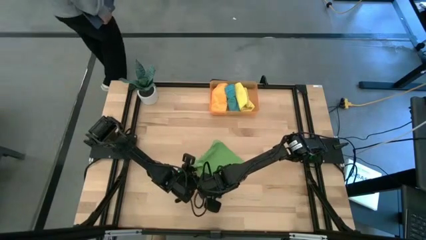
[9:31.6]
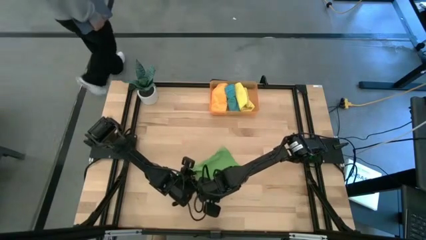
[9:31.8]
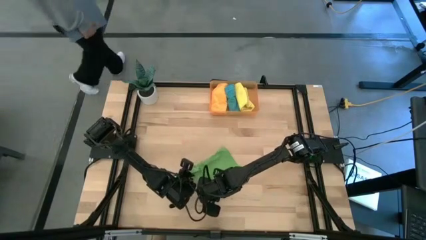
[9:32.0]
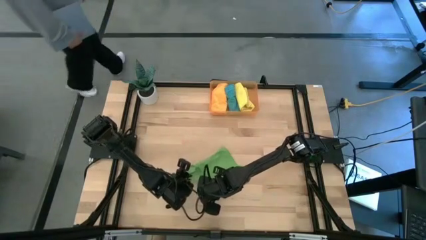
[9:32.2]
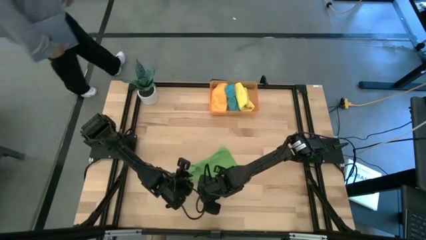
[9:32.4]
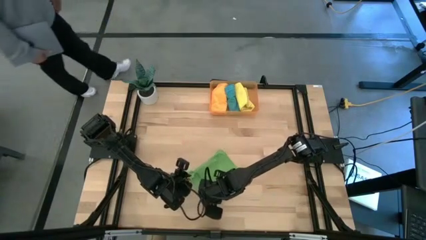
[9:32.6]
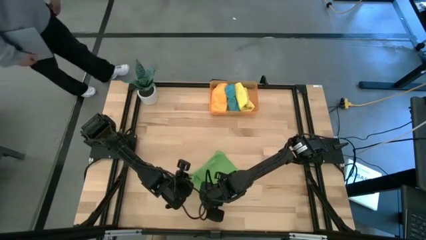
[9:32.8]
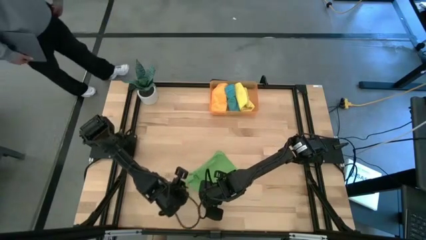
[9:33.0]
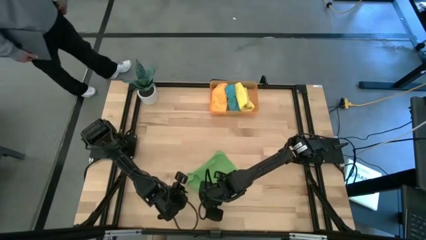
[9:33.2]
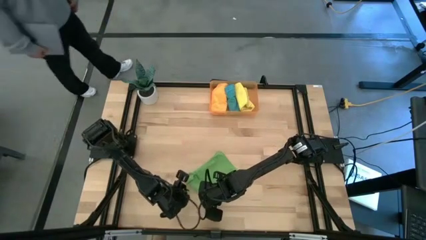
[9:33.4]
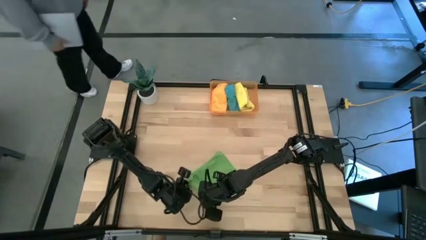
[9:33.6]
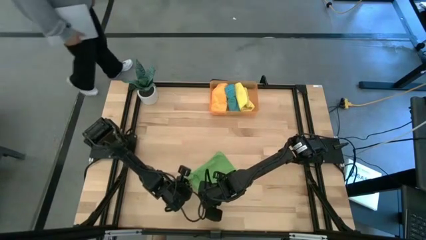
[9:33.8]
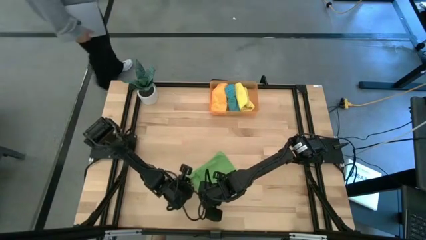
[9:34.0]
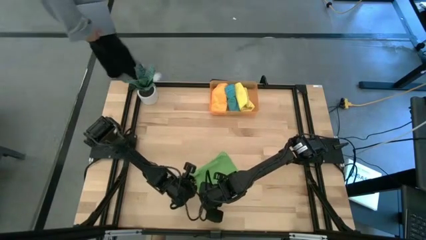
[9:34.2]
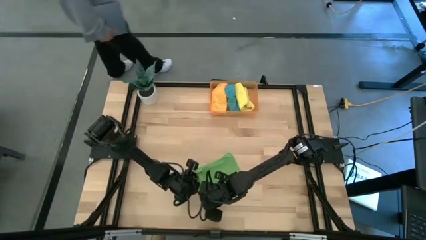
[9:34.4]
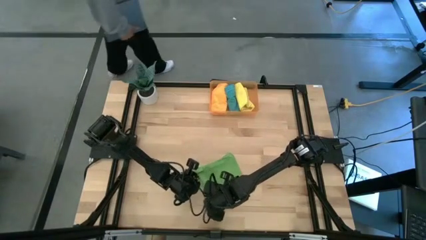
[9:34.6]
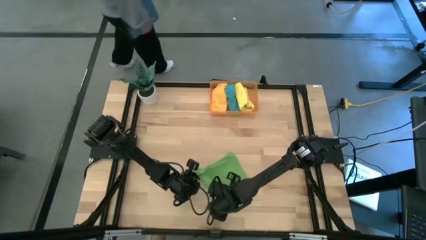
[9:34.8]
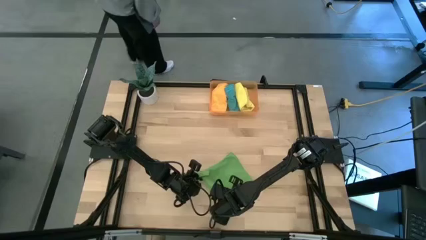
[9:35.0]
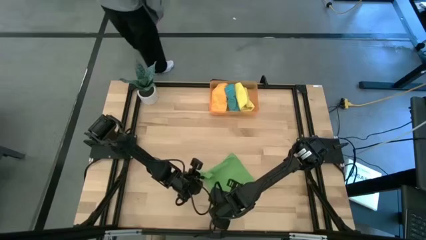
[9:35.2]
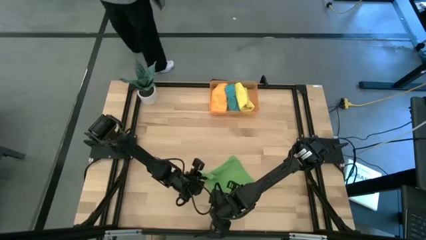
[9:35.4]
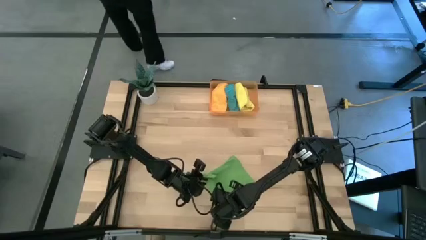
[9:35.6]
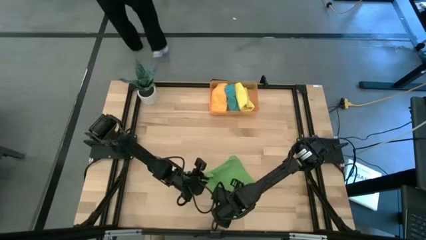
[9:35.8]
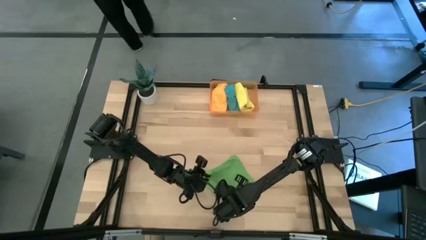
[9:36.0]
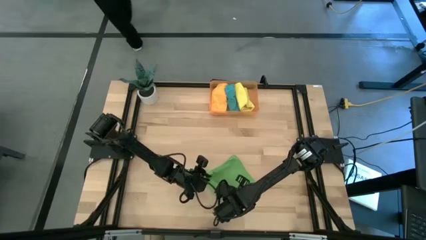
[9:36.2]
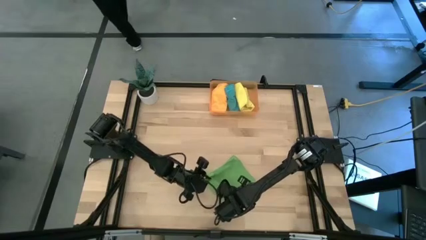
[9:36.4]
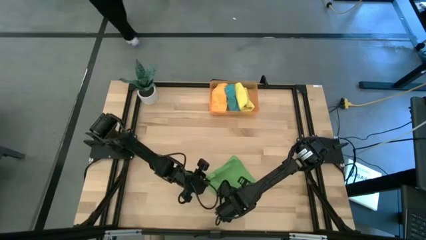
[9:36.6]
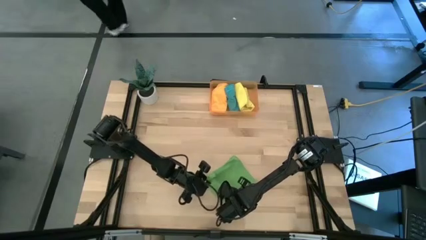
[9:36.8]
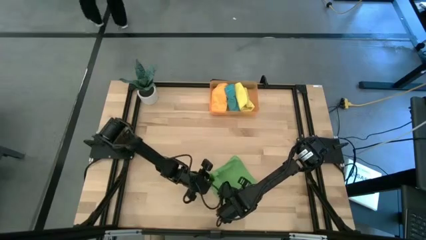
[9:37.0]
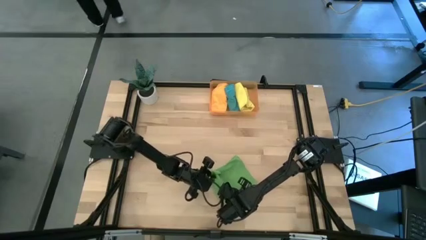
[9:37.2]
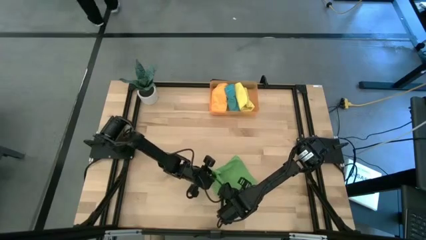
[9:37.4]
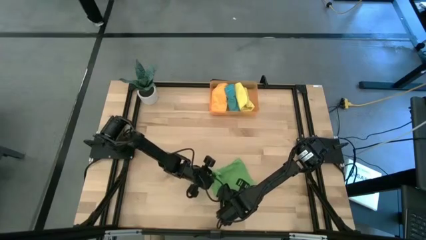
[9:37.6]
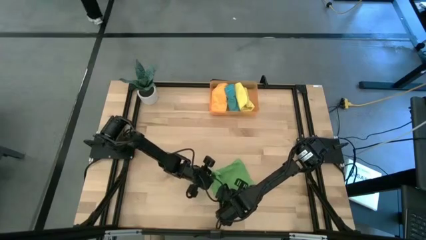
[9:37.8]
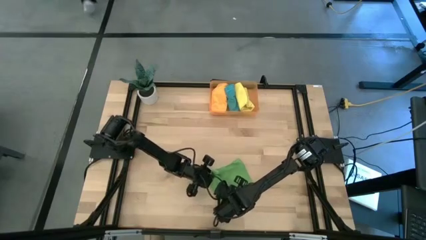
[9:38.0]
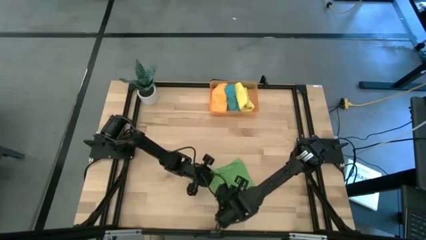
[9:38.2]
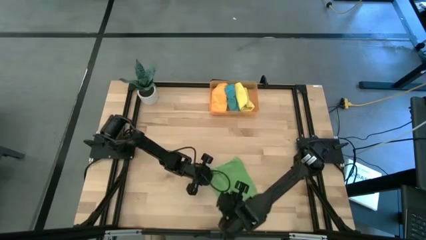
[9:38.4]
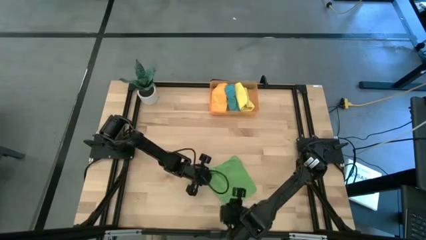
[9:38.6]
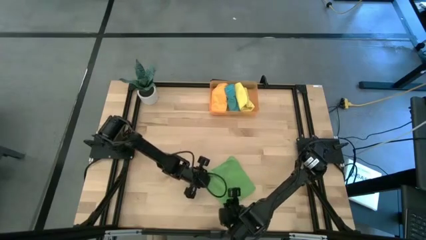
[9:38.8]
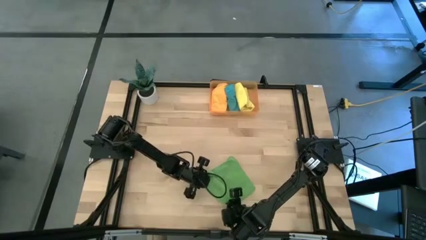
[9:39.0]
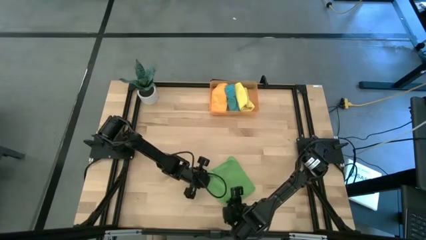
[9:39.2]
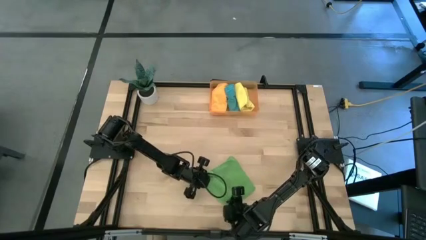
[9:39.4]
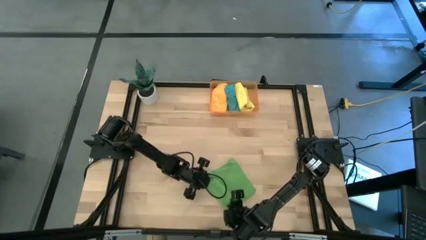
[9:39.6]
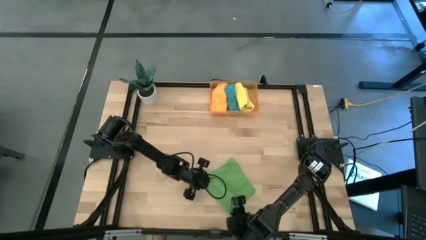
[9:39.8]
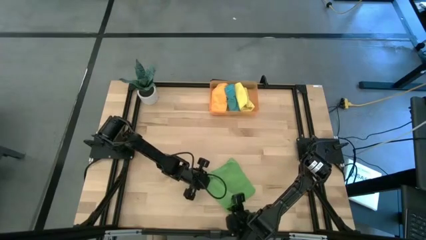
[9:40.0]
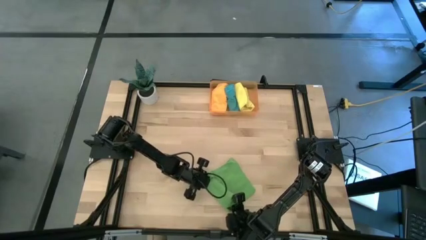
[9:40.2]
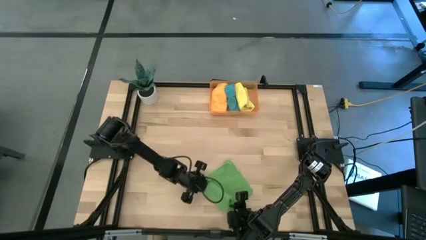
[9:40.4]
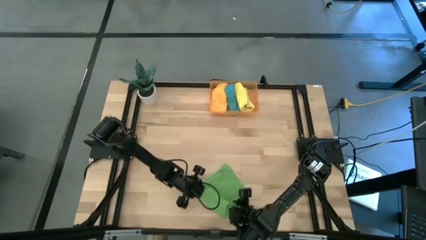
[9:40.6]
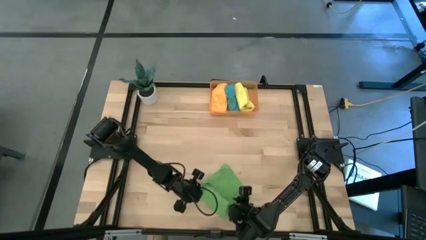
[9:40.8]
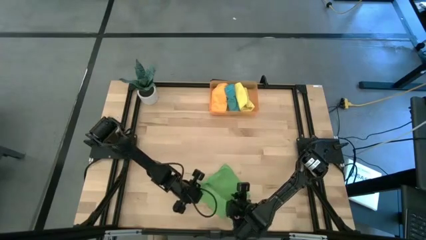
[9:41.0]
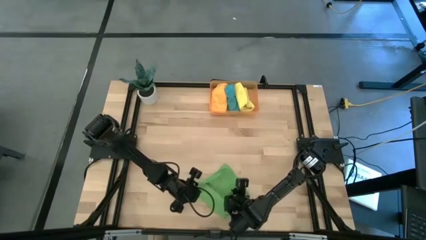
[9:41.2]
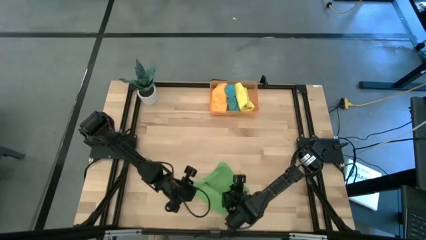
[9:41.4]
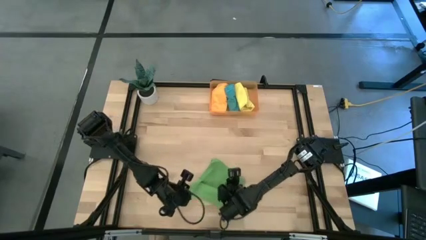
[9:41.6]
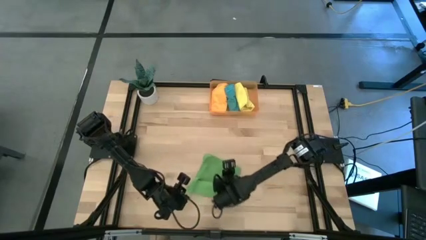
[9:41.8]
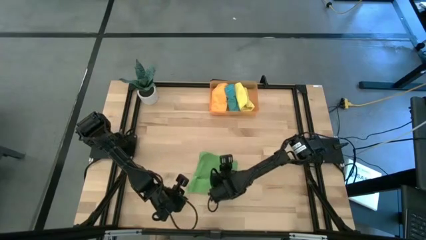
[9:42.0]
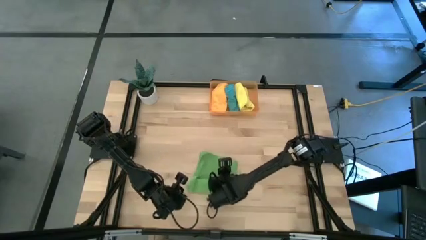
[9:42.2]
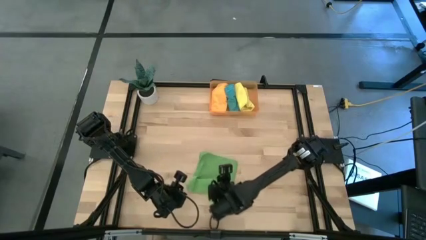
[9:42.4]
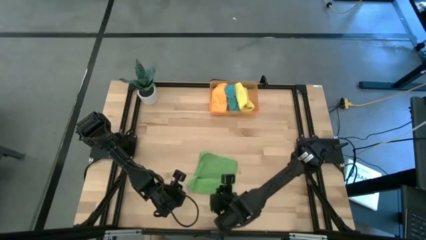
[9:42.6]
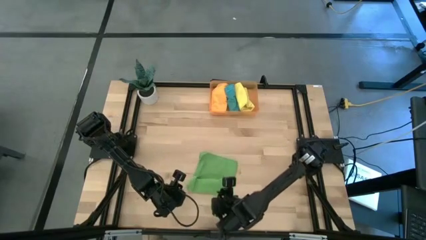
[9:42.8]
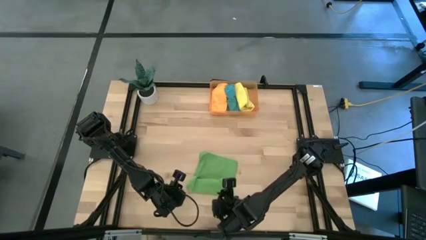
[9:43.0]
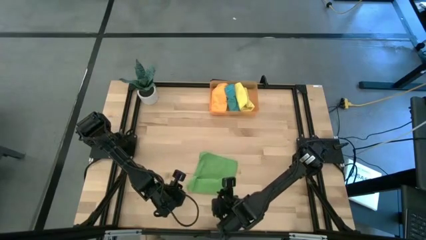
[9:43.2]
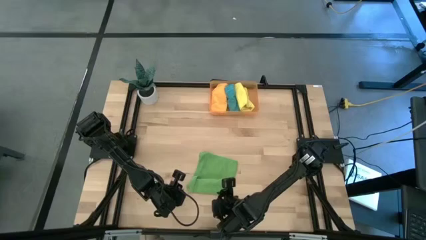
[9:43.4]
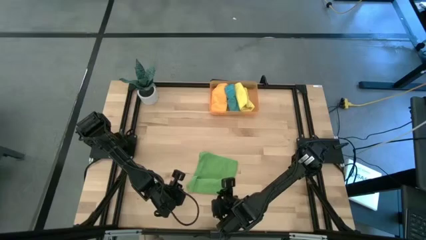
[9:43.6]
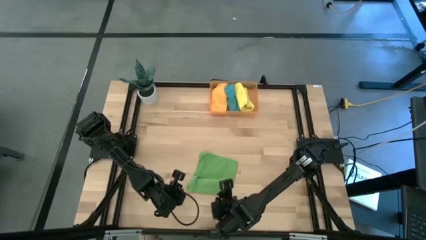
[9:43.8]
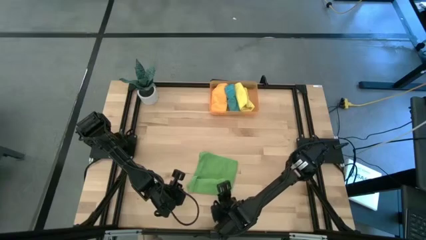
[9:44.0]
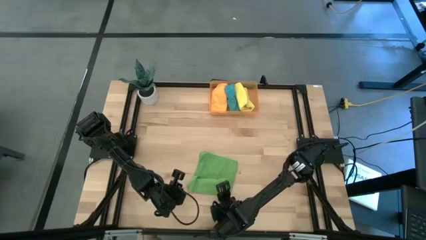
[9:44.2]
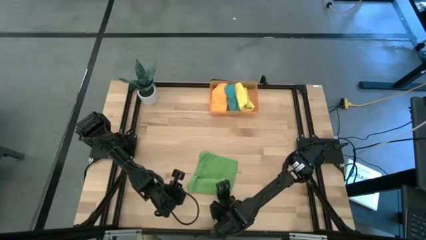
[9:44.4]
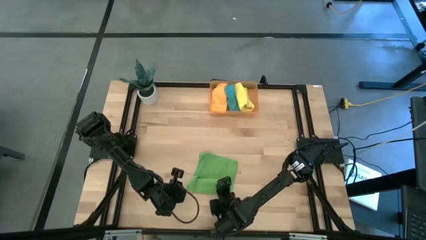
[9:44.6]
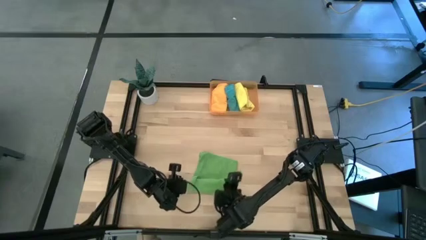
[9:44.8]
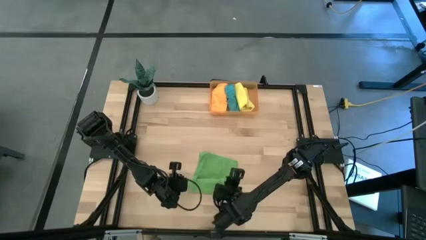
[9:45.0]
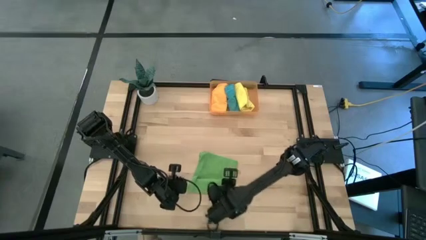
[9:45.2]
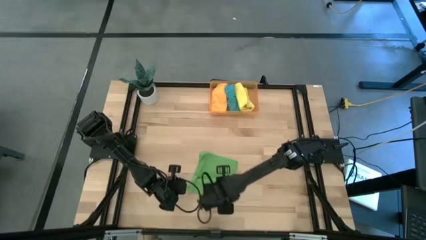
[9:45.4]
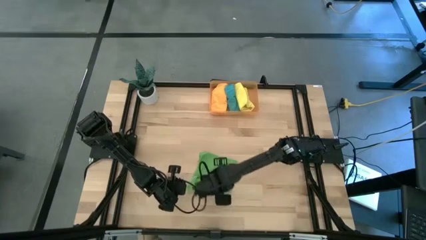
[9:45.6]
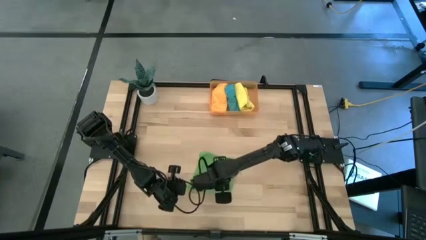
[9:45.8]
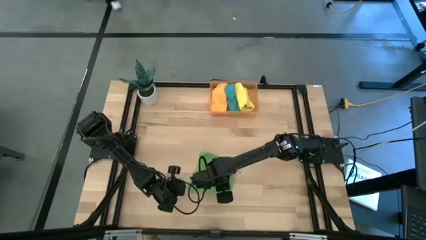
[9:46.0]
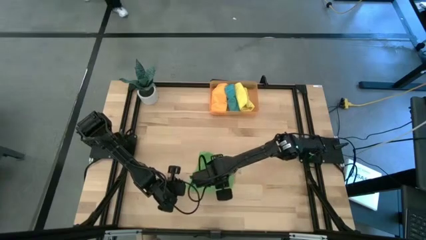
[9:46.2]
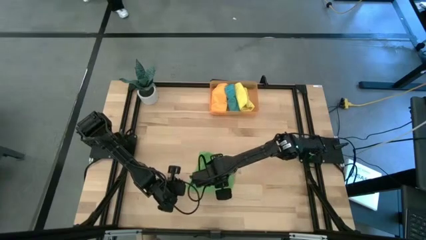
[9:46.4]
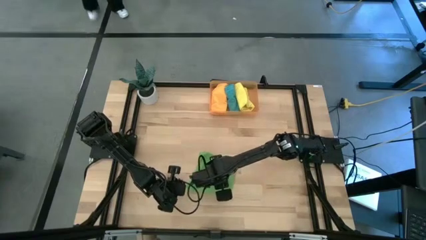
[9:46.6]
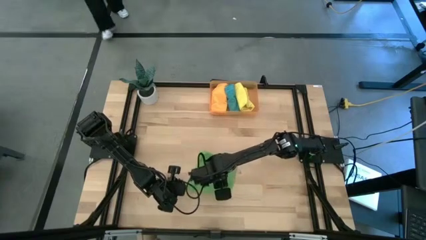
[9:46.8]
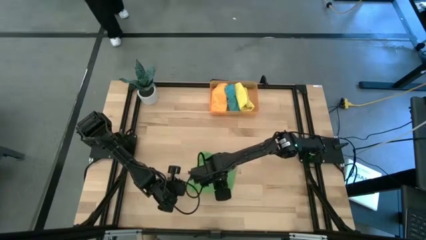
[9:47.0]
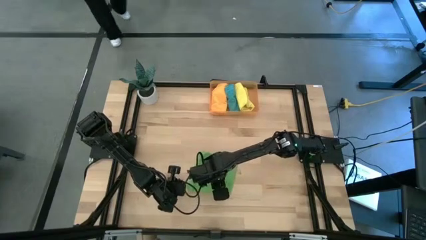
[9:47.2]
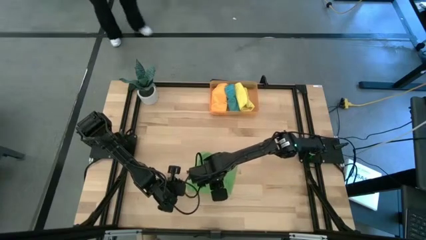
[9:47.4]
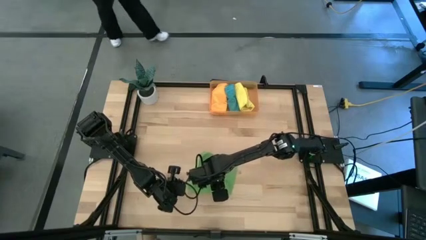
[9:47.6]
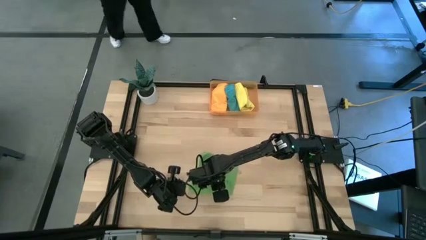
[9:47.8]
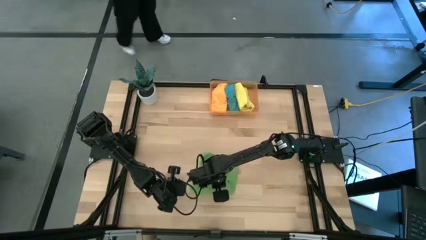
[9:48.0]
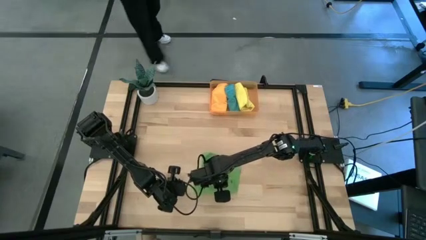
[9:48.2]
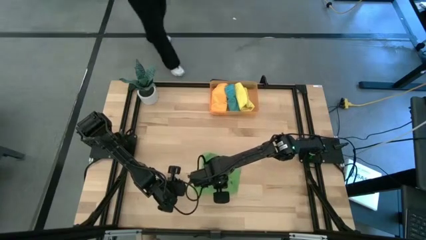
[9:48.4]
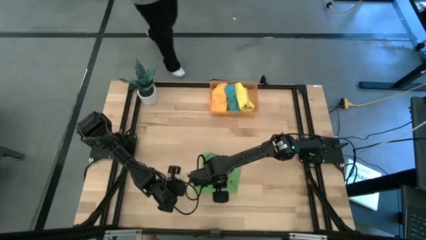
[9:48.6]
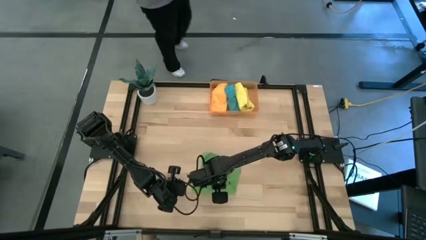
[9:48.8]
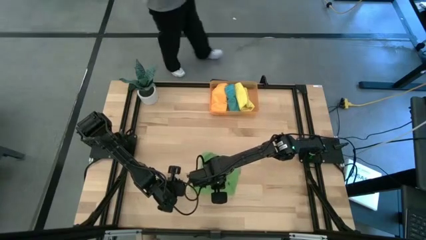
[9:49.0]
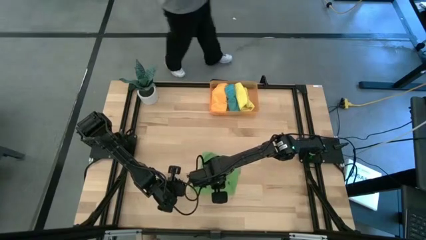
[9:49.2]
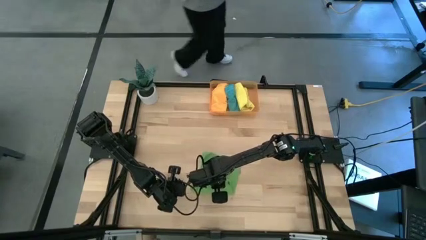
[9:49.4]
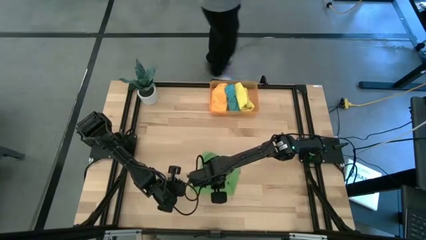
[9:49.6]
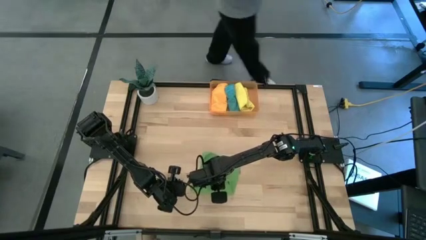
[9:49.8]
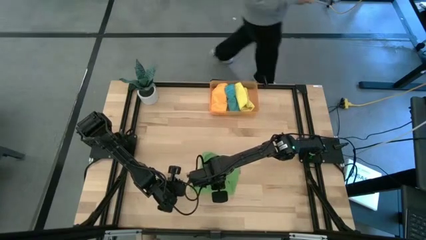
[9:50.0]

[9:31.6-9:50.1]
Task: Roll microfiber towels into tight, uniform cylinder then place into a basket
Roll the green microfiber towel
